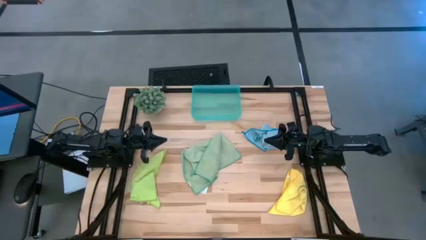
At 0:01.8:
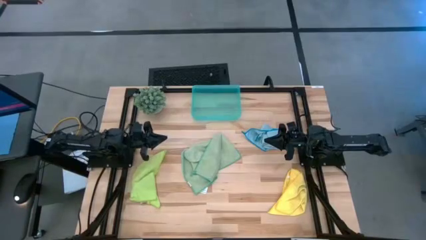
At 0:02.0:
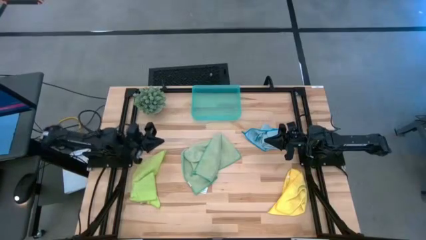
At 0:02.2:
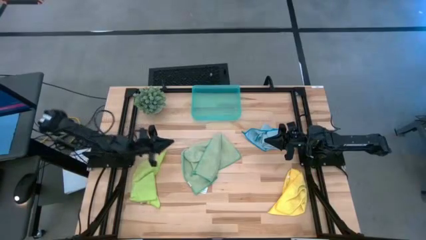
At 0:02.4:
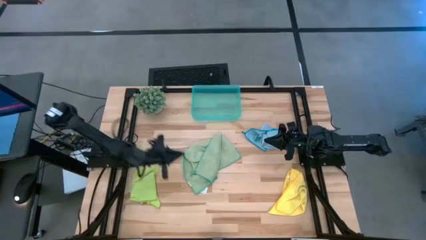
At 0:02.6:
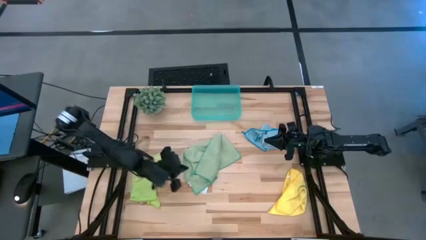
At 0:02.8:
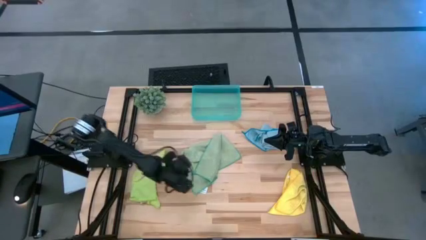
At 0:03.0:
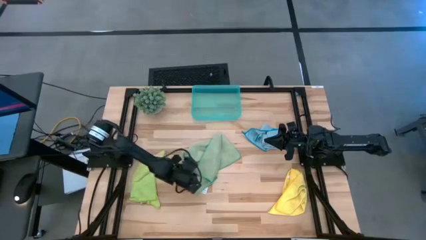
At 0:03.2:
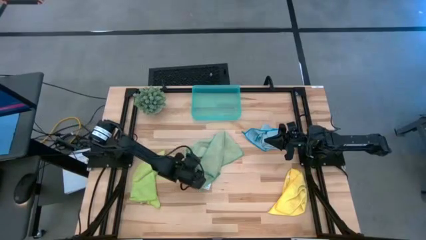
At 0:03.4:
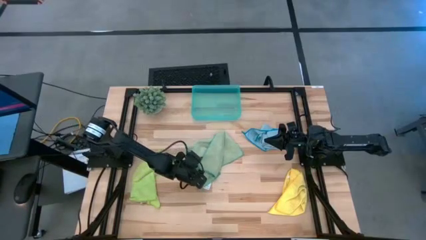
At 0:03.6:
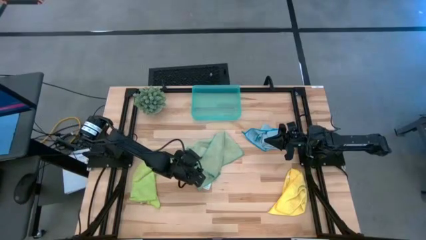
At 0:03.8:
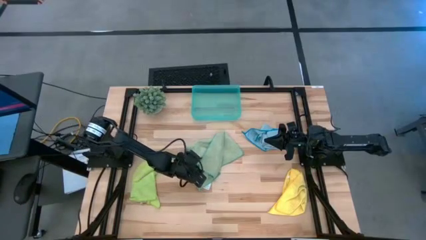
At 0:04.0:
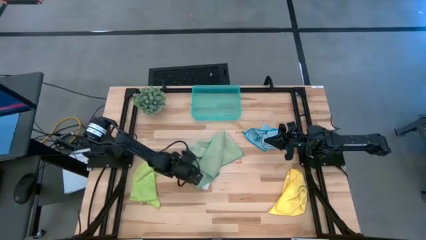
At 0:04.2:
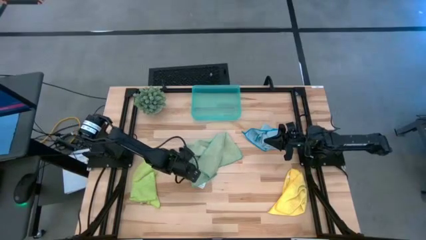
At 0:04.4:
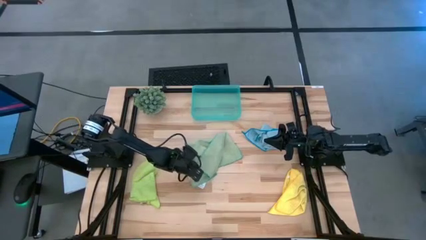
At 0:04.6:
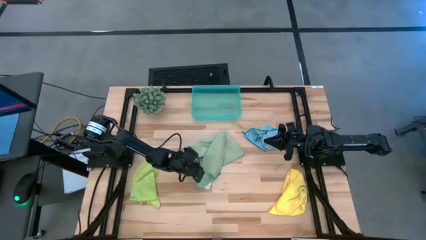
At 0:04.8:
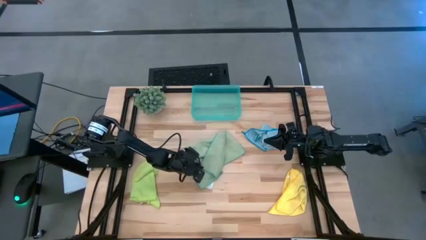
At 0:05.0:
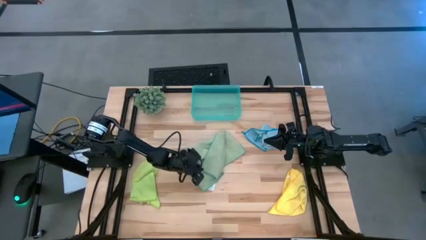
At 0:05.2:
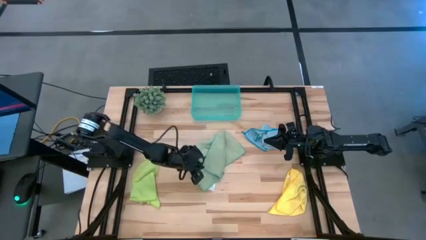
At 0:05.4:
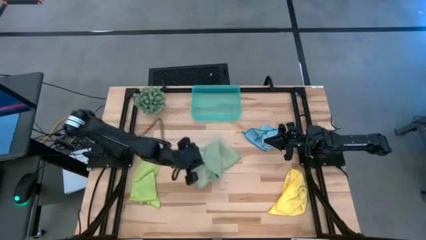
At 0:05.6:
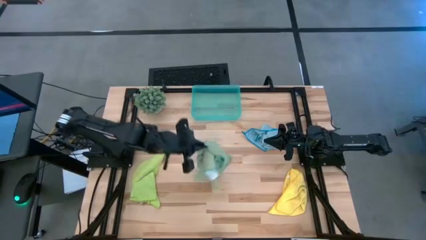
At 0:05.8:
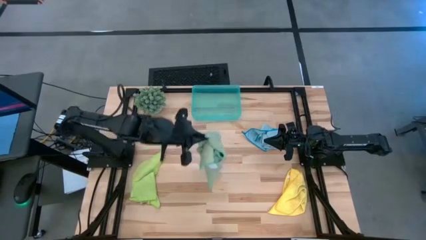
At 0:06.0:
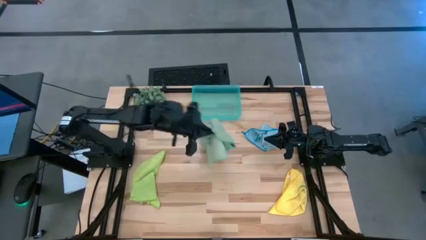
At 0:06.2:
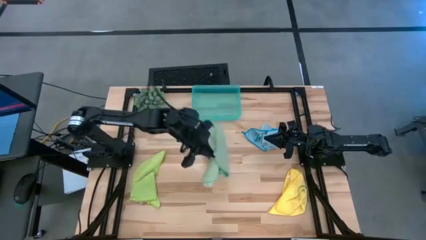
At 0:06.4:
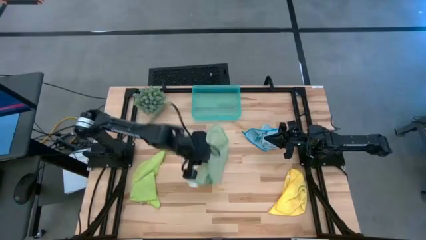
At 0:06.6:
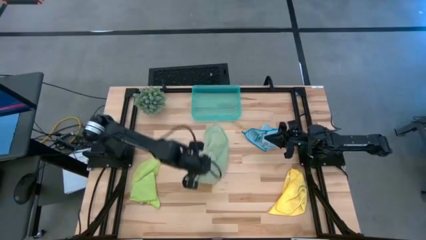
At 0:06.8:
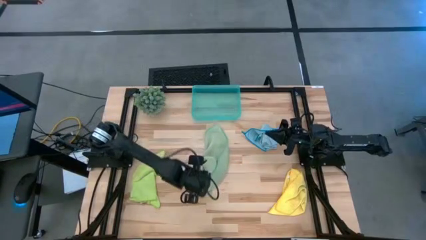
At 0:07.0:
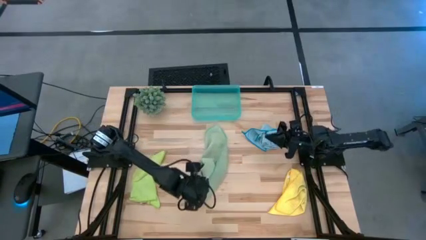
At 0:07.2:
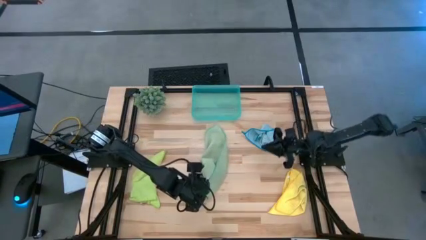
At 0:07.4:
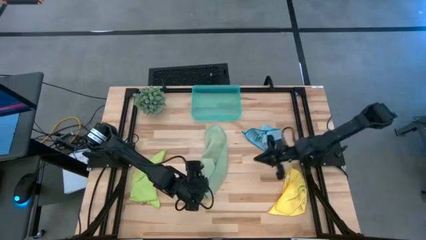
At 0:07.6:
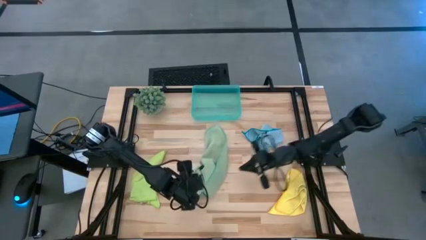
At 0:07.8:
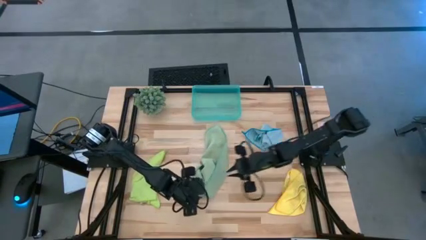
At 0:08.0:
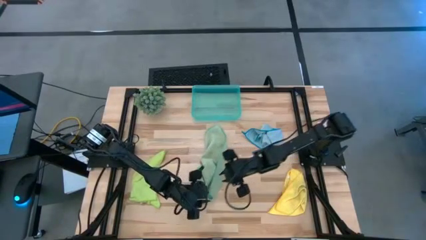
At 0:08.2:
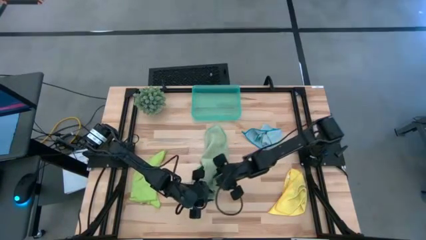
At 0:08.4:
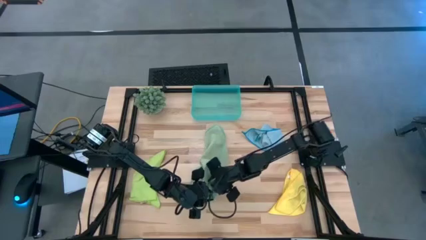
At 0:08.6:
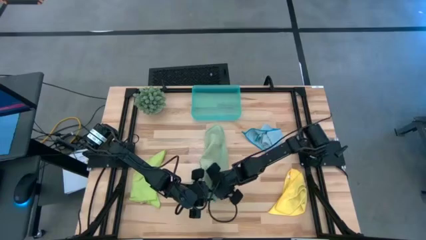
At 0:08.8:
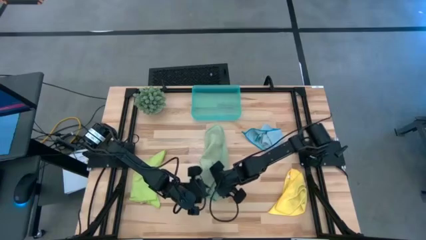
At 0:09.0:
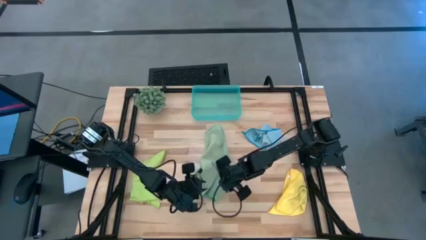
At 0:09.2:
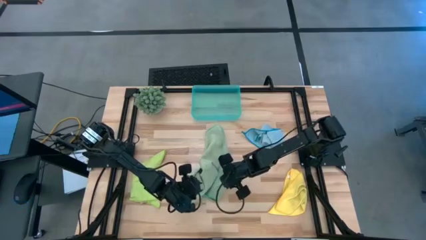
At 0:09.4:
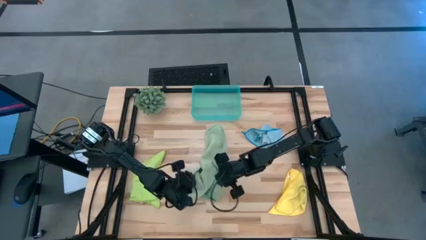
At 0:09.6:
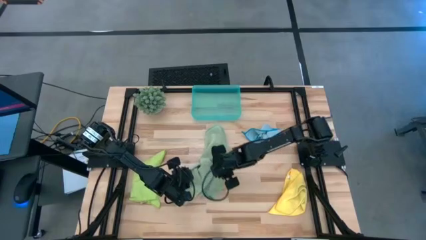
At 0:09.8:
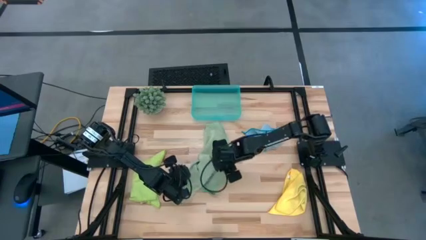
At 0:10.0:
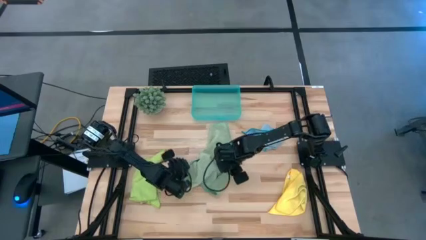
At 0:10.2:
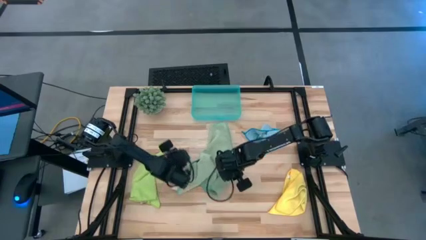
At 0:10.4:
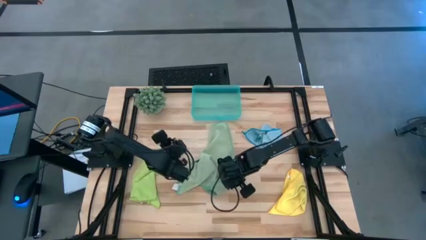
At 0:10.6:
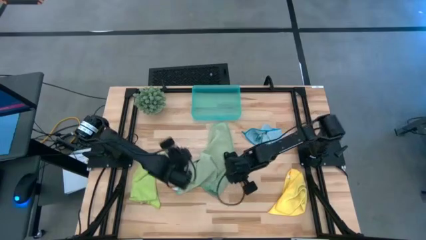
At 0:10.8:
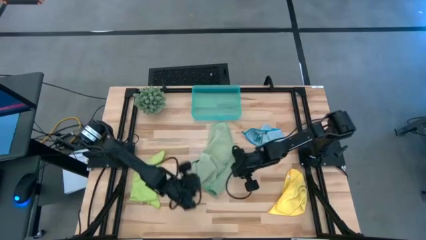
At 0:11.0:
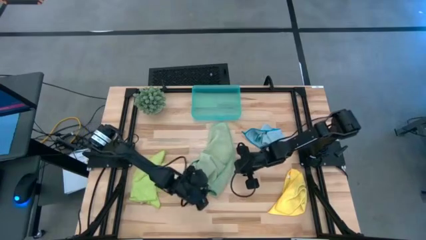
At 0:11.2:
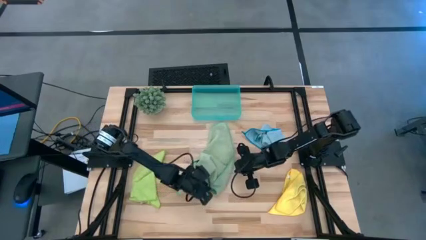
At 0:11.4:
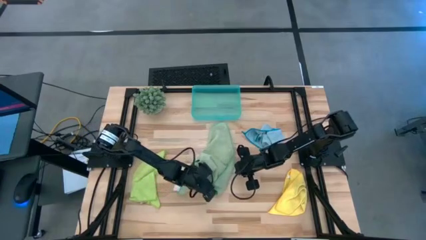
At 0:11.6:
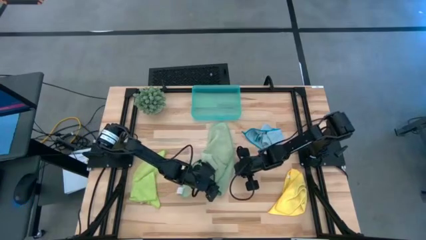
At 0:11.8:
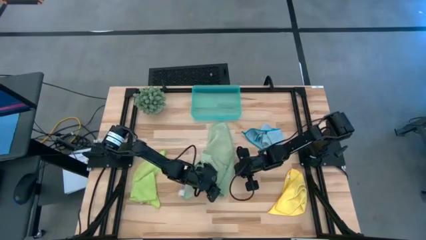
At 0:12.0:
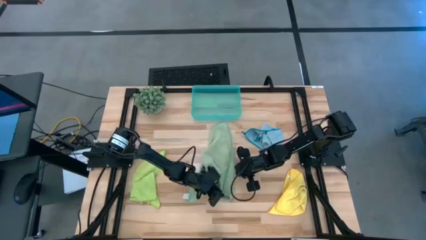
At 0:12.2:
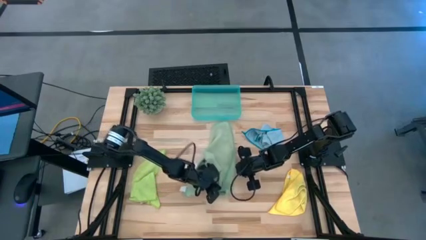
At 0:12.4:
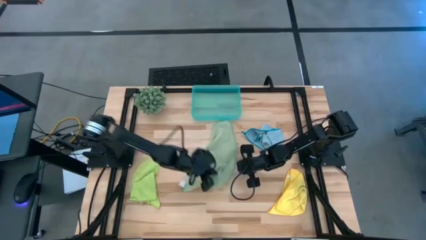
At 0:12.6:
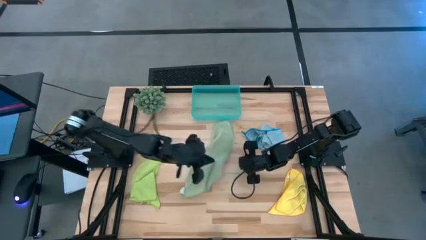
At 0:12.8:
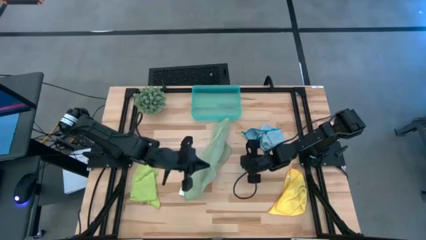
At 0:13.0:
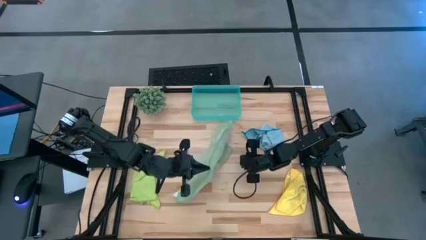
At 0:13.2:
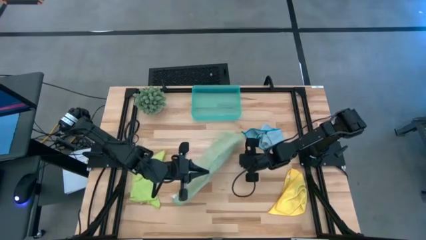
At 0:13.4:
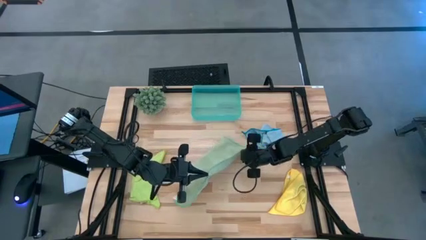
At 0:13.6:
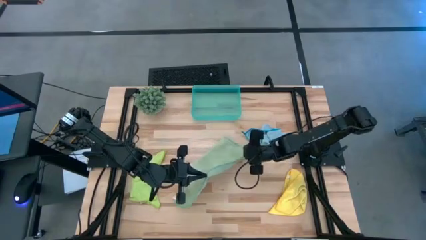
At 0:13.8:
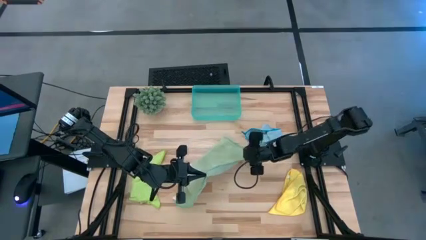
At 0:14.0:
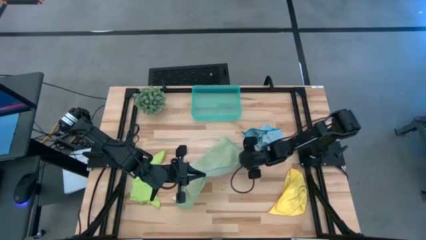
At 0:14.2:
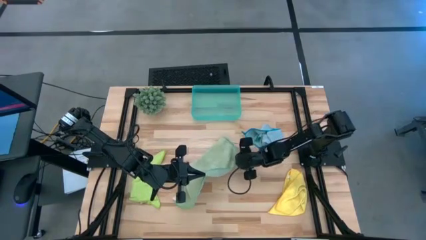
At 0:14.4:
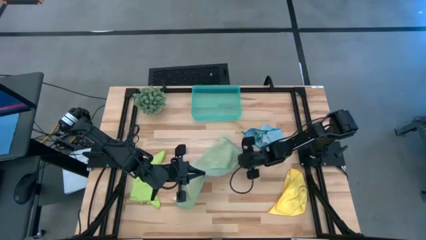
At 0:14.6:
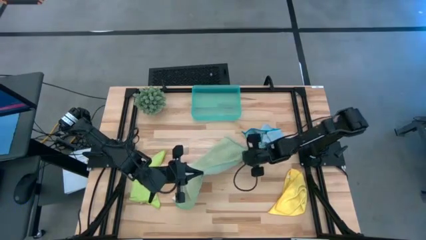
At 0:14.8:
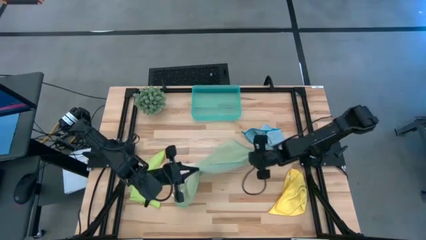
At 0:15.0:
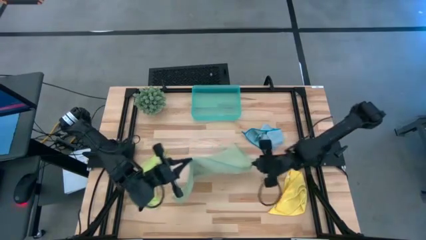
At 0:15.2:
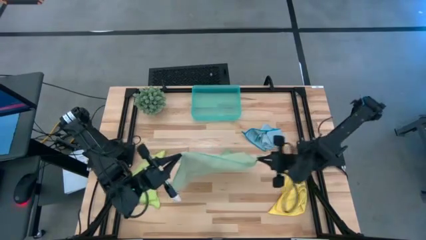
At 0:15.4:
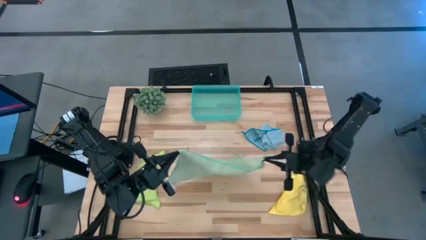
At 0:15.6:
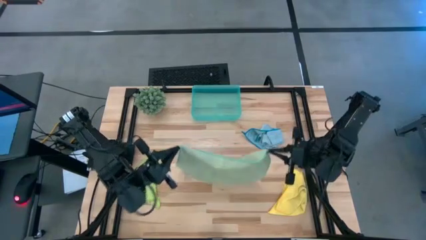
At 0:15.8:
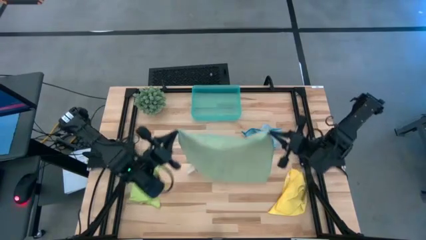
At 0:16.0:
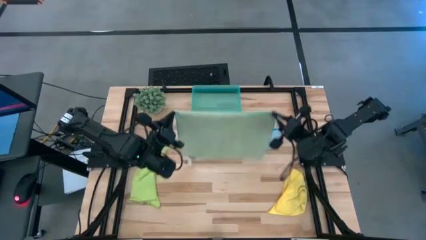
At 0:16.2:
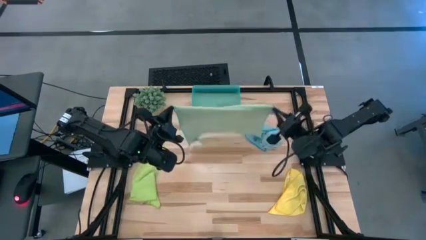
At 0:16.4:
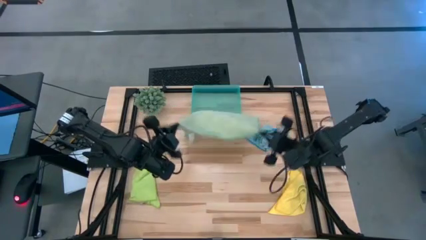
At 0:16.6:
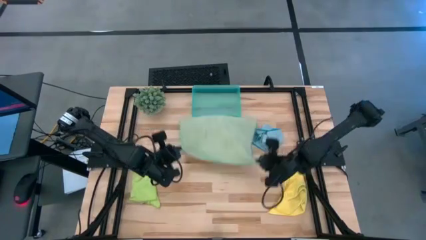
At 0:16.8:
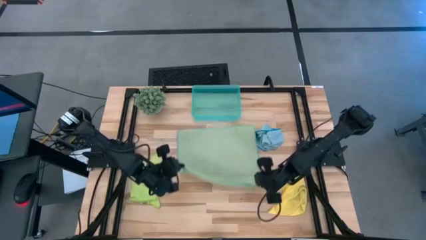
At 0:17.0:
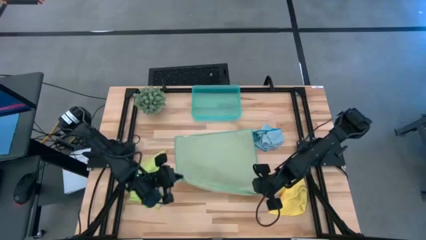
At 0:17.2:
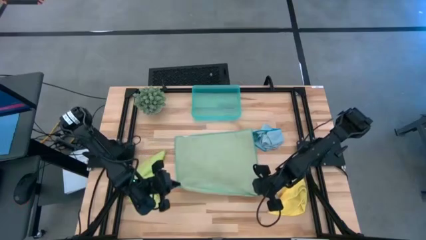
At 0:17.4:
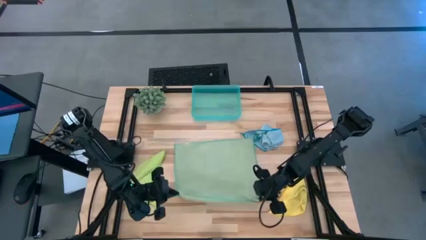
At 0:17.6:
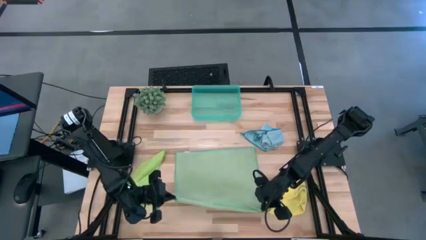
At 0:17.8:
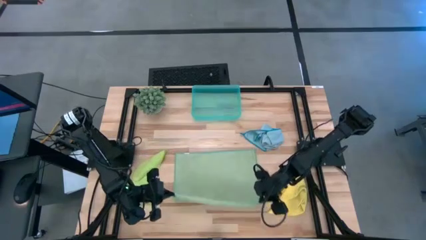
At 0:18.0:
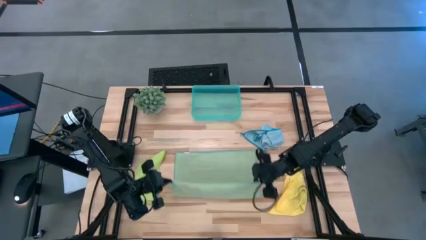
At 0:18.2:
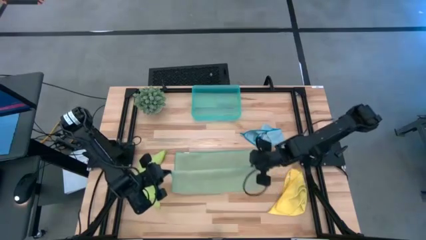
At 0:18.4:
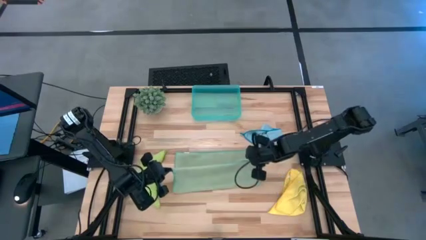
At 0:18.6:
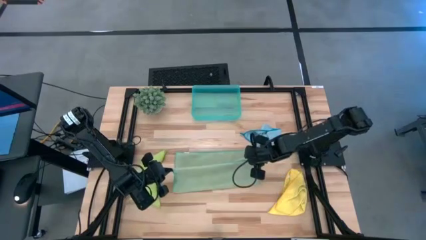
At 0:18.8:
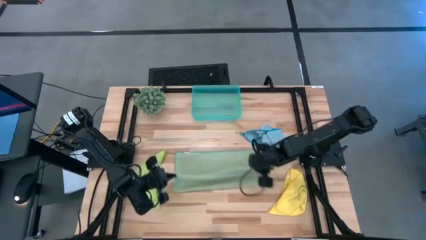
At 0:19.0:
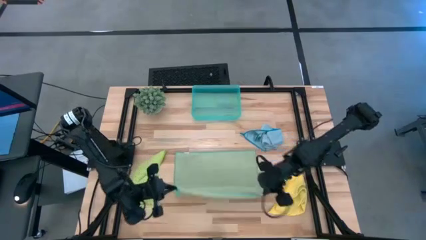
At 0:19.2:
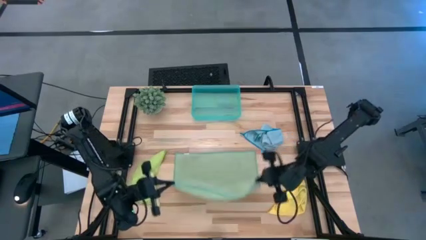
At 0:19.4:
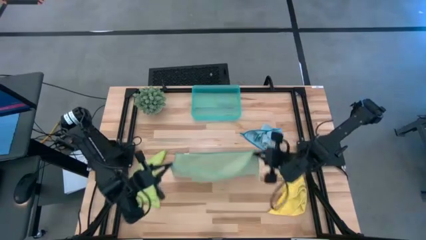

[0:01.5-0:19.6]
Task: Fold microfiber towels
Fold the green towel
